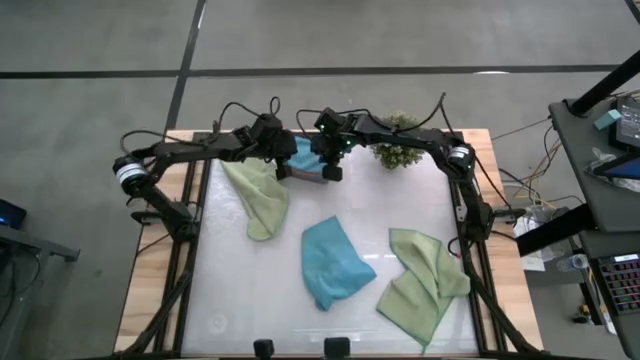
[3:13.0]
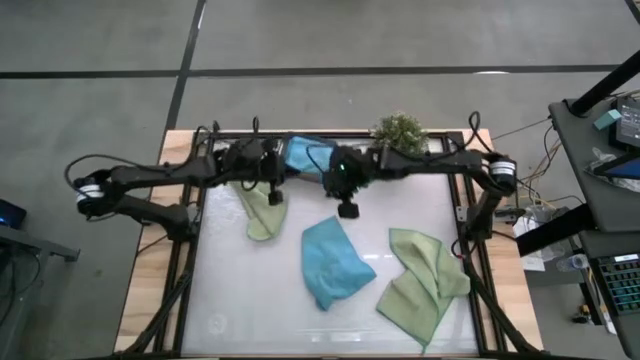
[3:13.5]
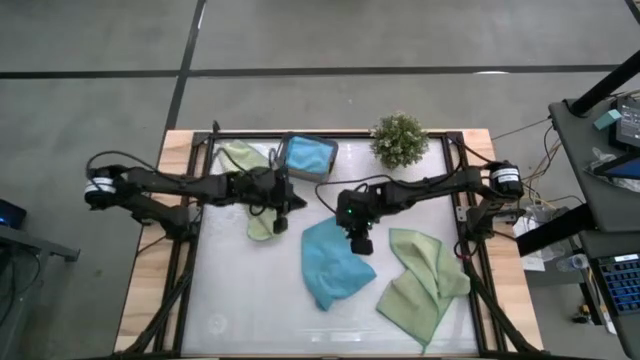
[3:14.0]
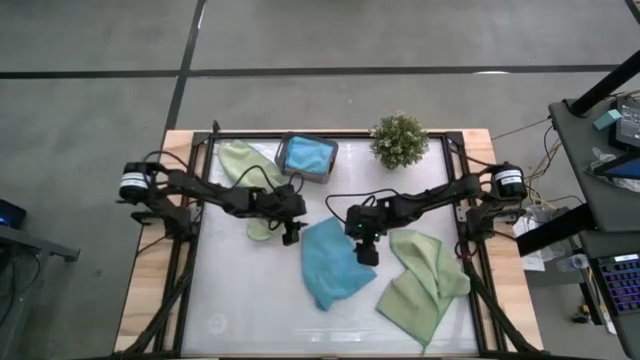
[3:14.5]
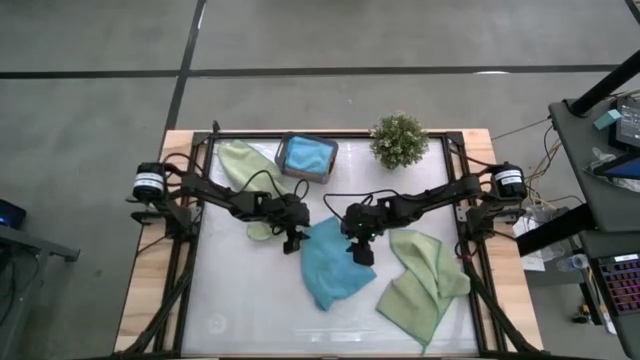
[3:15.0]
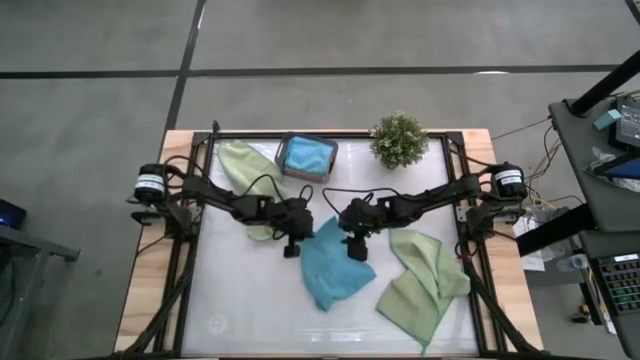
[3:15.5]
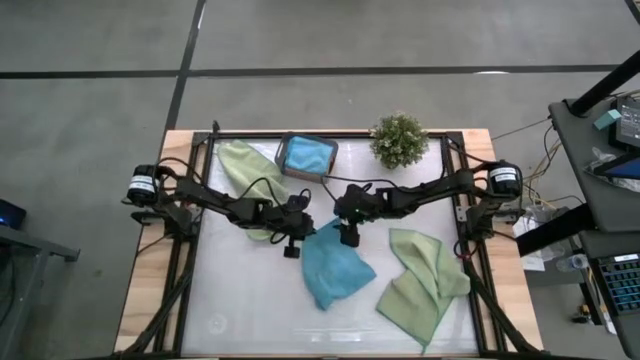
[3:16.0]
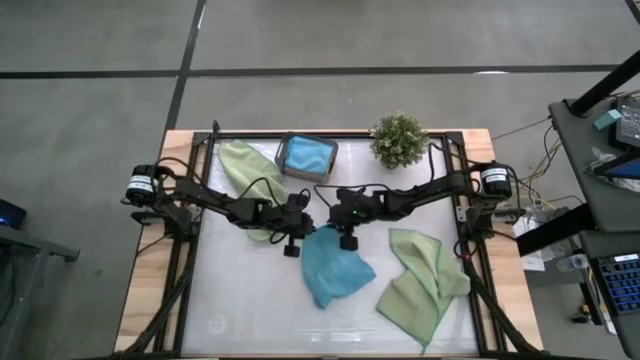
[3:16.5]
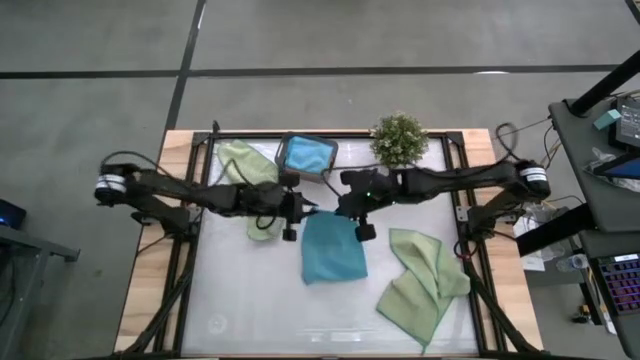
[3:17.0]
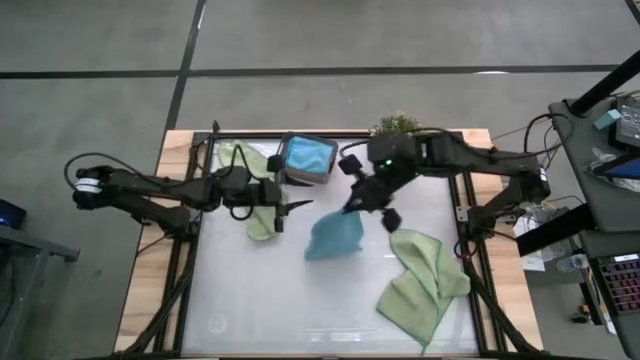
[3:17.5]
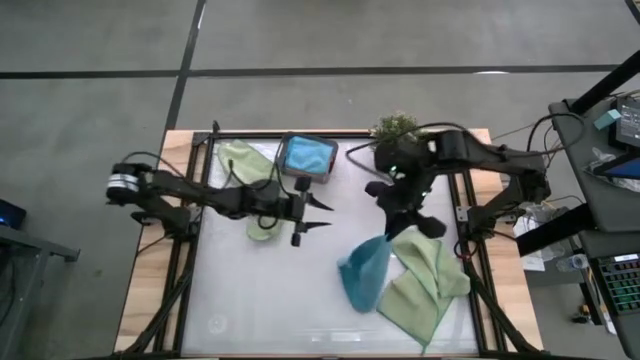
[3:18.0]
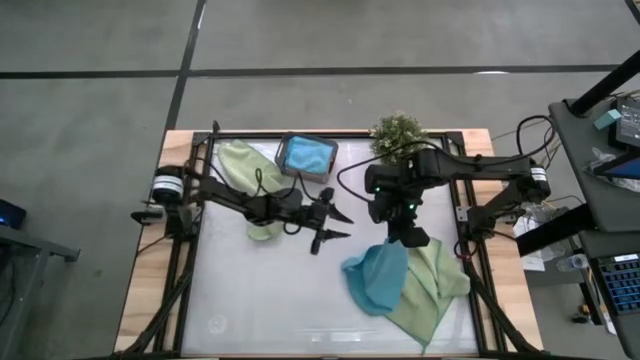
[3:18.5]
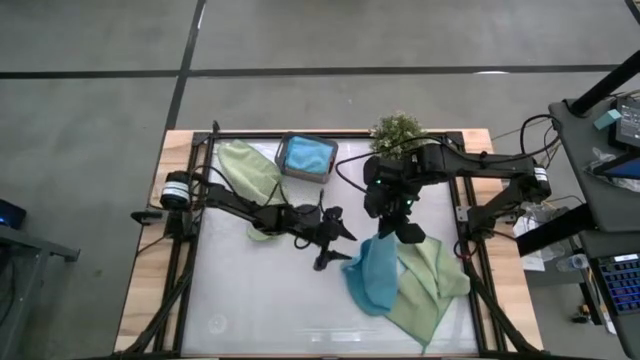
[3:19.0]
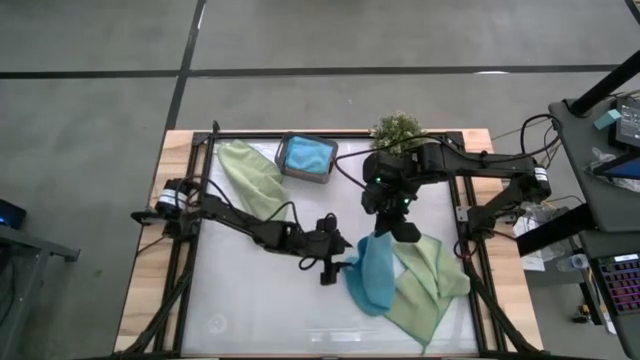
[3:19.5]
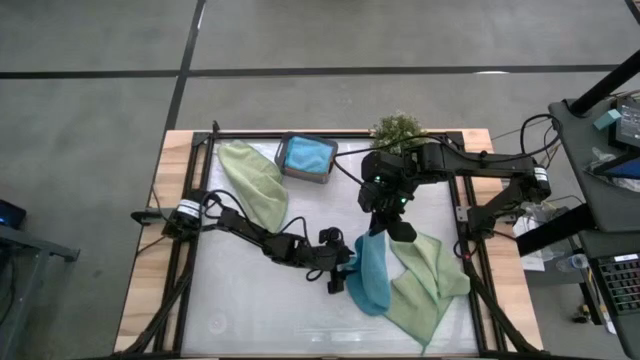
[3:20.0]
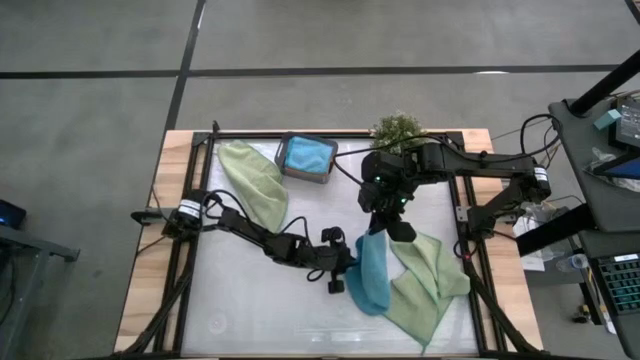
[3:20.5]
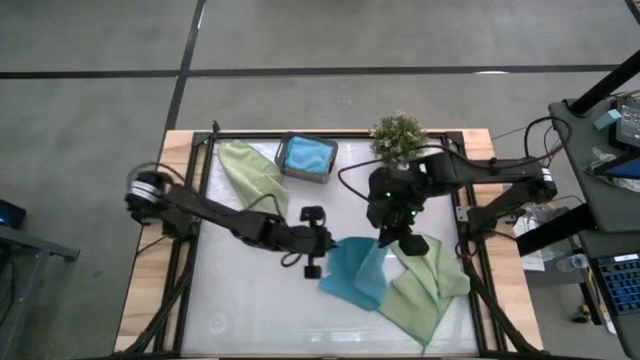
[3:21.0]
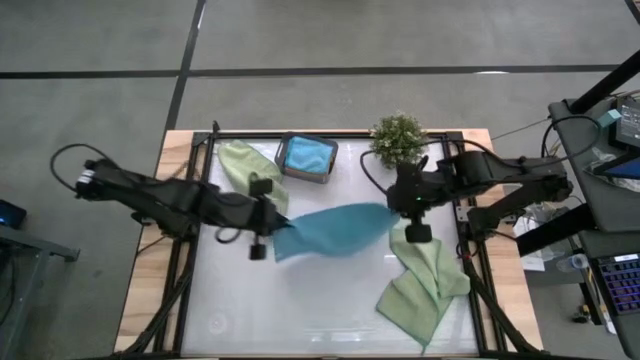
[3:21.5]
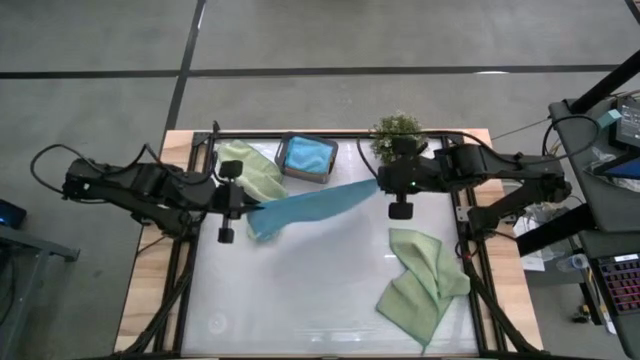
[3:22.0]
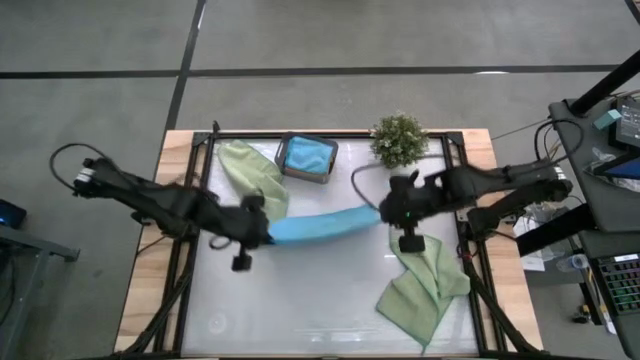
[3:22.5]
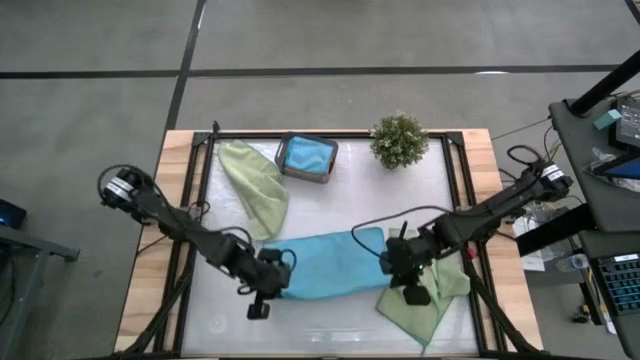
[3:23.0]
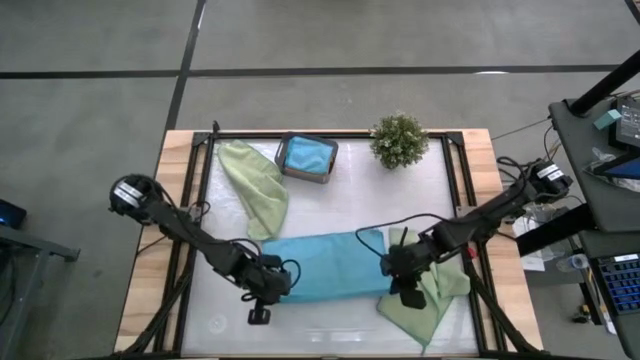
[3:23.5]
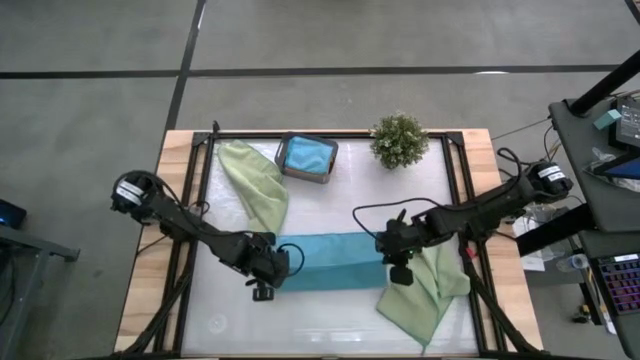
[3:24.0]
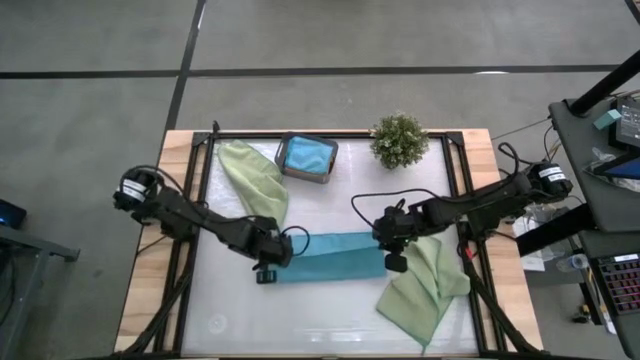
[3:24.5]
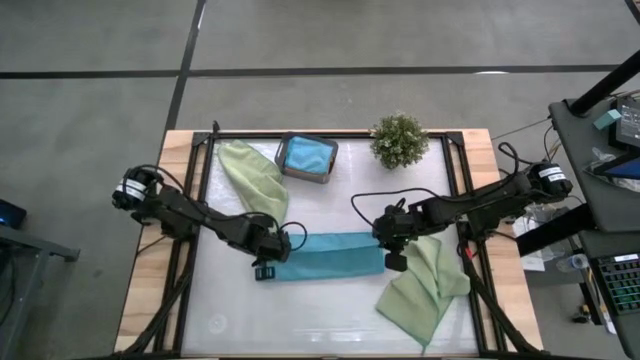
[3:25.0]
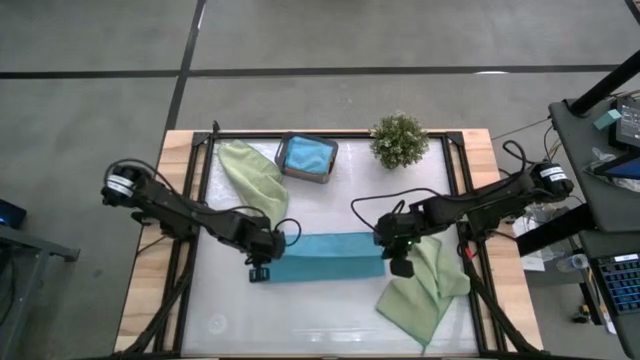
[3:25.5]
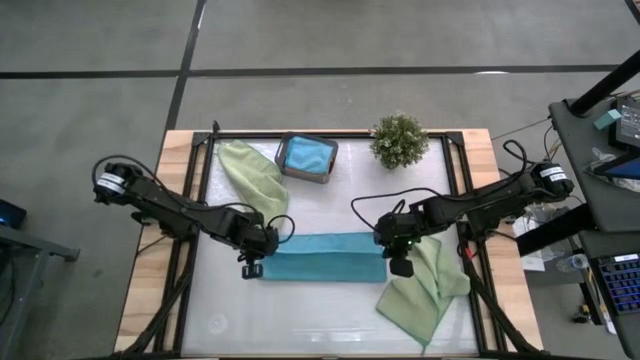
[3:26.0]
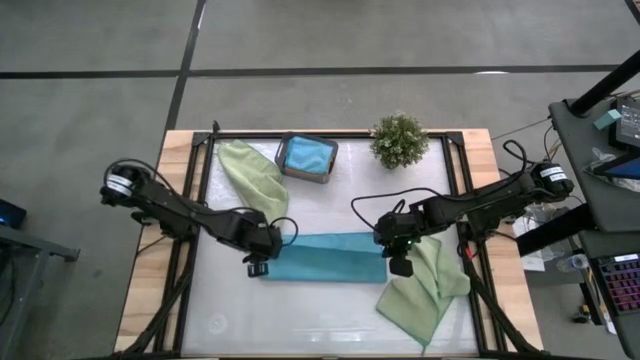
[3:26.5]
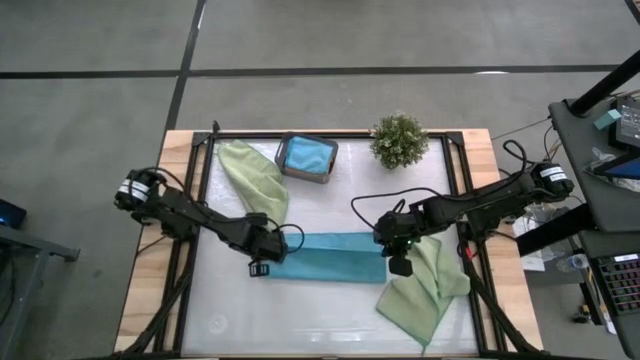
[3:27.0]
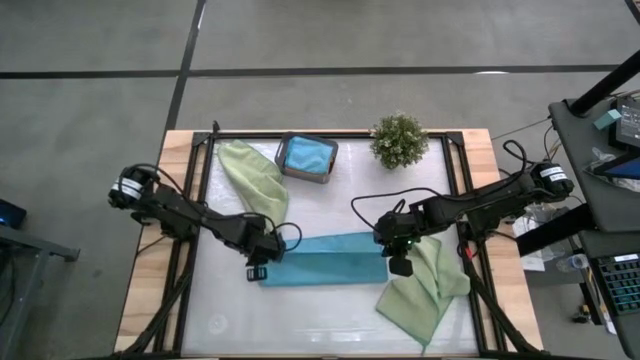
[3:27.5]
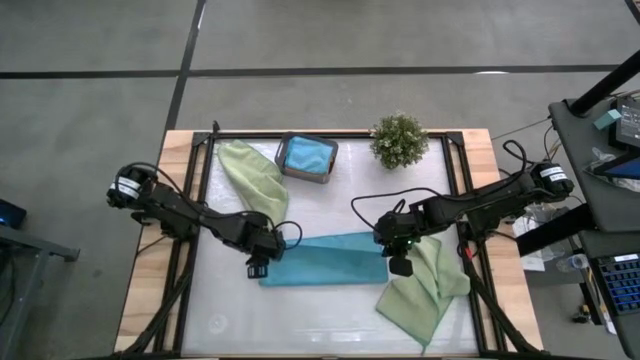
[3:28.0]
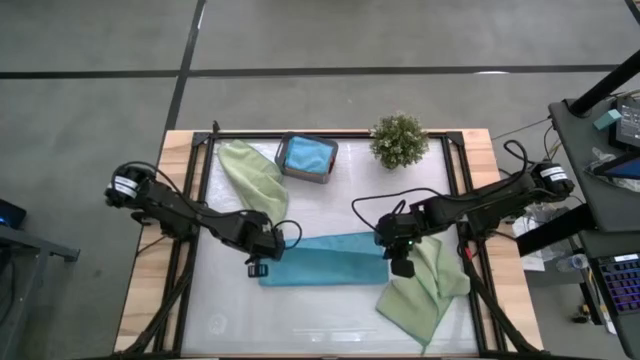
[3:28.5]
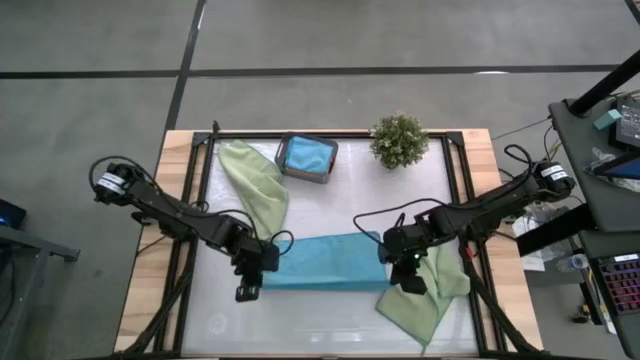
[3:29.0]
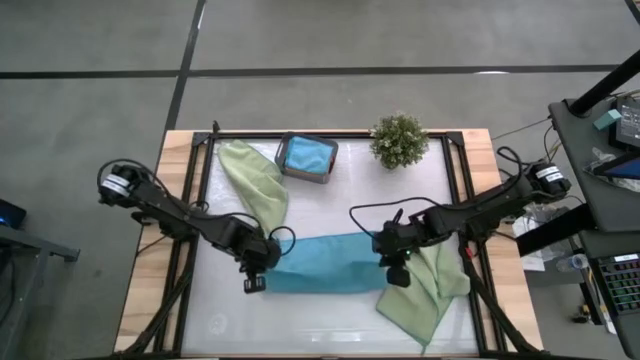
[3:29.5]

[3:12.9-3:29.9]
Task: Fold microfiber towels
Fold the blue microfiber towel

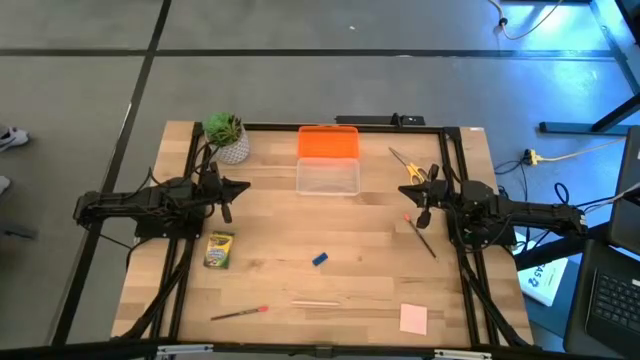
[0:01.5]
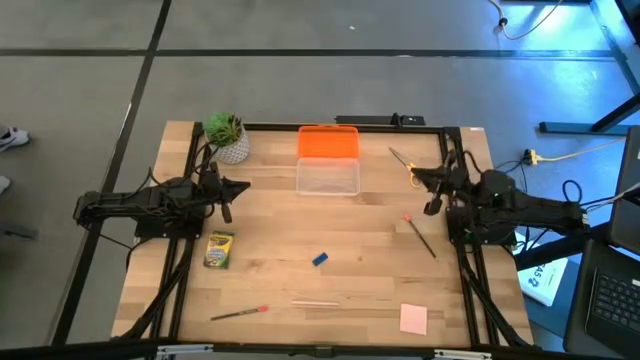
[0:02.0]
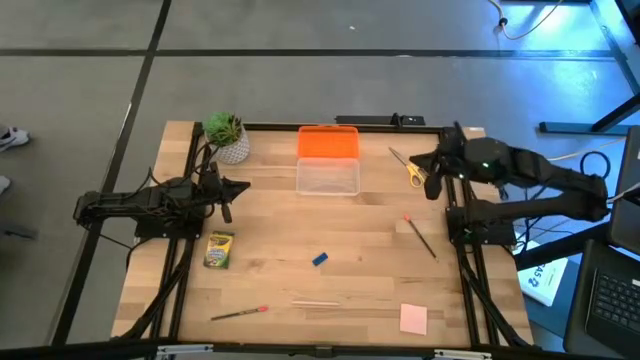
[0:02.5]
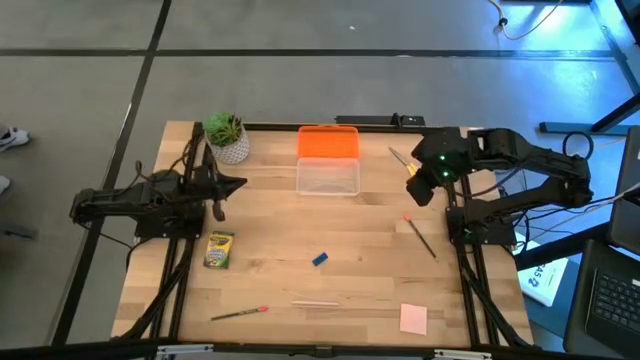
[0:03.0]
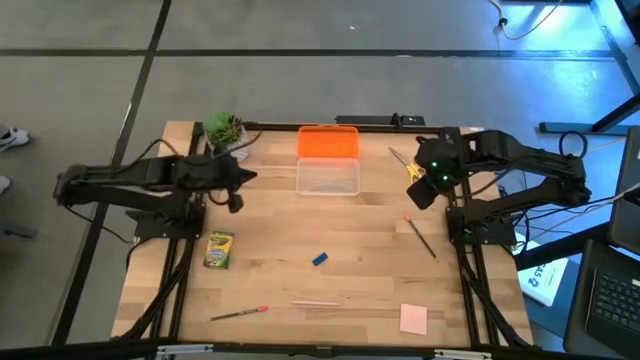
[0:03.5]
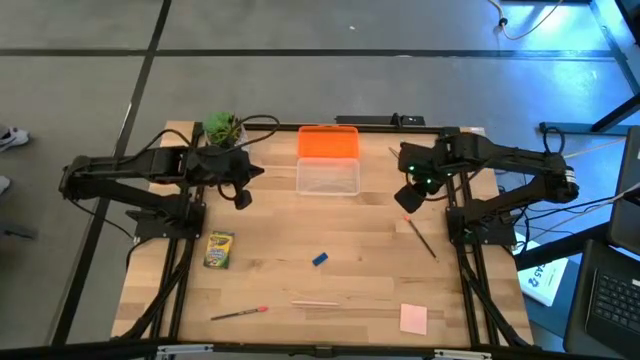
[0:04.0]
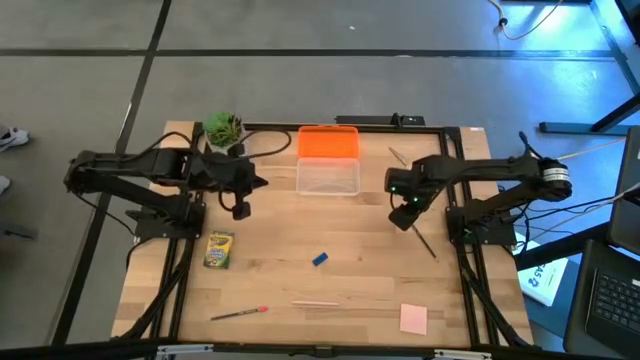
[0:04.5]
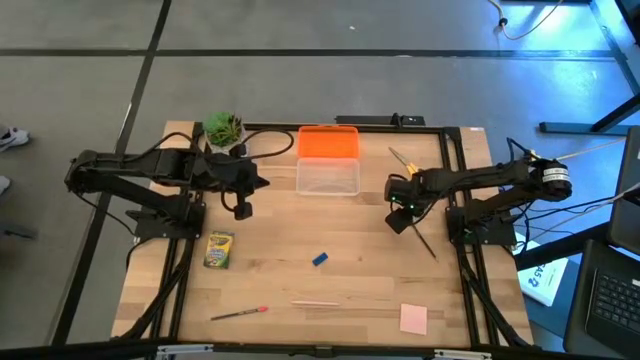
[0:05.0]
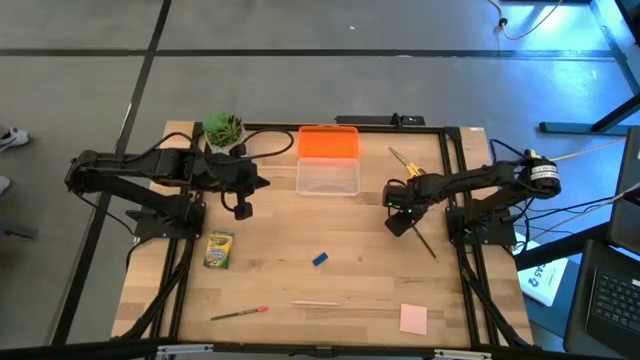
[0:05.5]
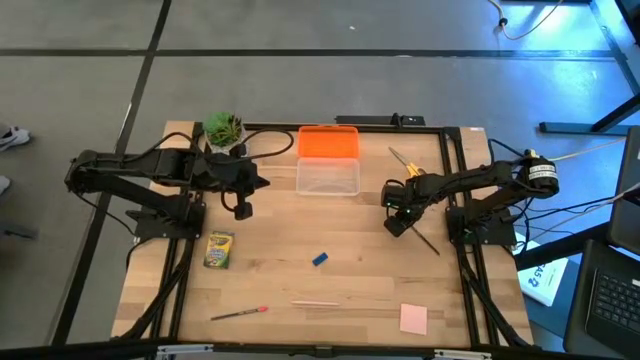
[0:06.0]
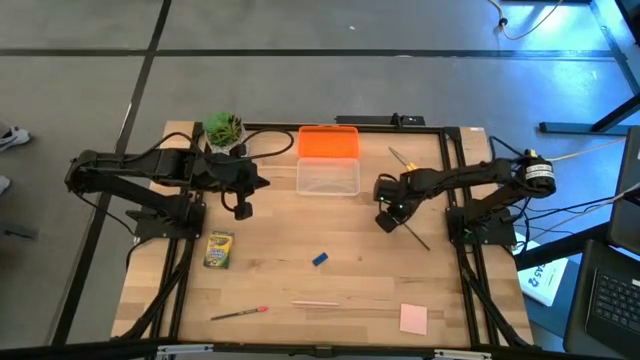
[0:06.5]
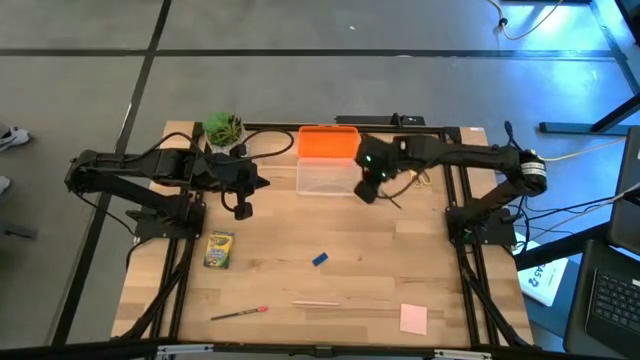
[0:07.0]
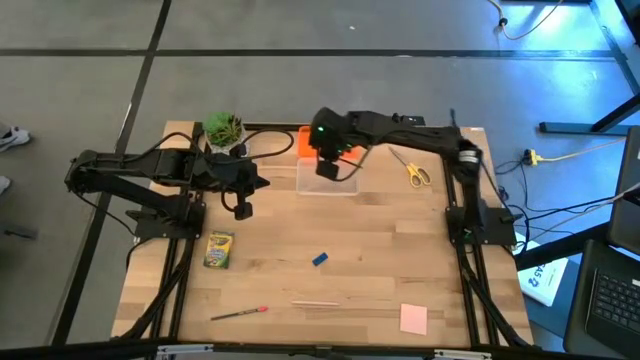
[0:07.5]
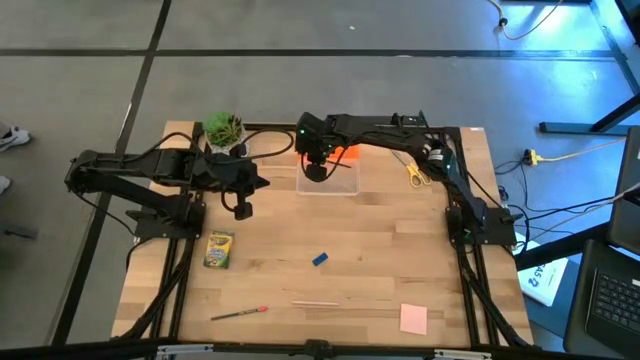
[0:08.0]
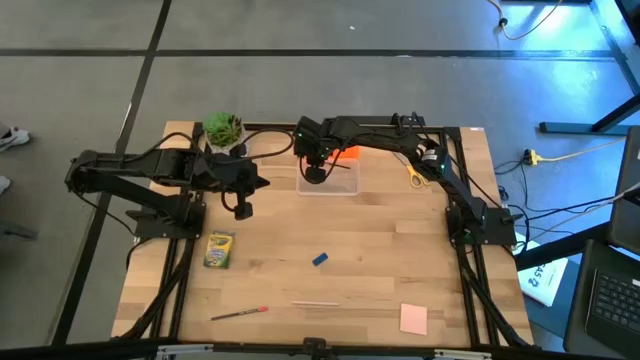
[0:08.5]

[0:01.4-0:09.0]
Task: Pack school essentials
Put the top black pencil into the orange supply box
